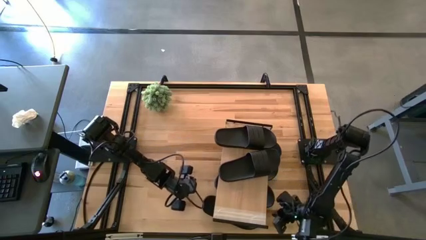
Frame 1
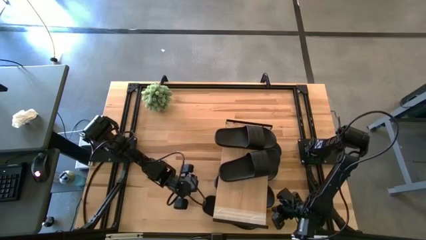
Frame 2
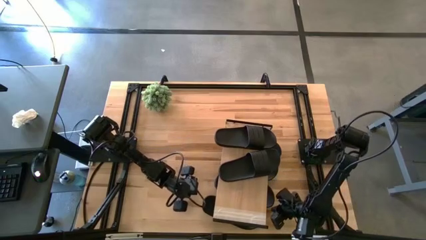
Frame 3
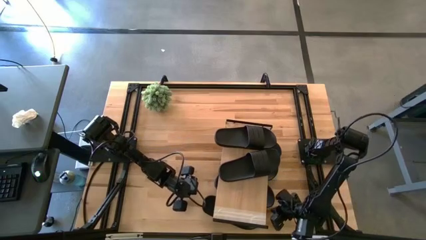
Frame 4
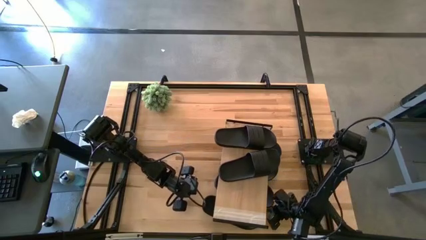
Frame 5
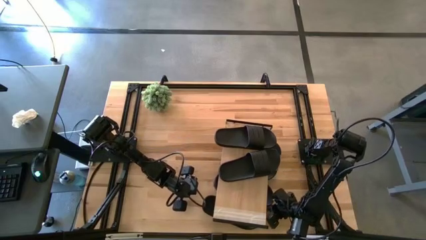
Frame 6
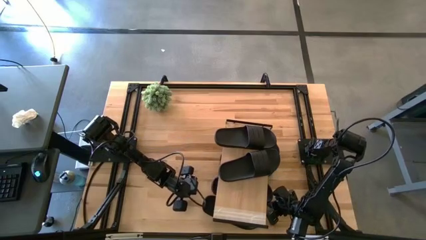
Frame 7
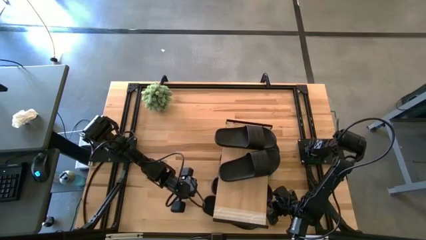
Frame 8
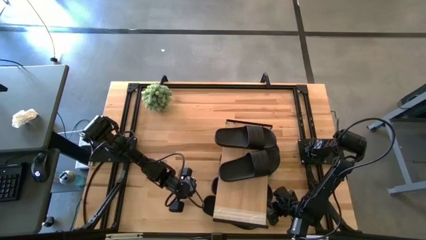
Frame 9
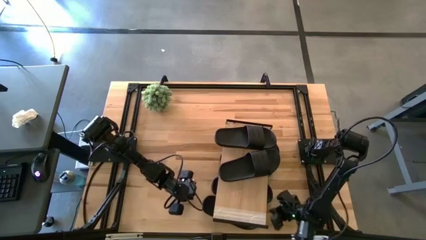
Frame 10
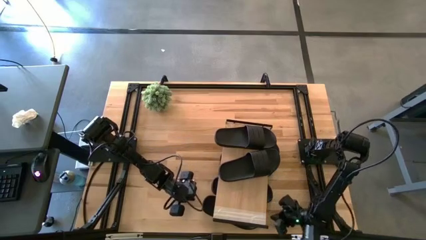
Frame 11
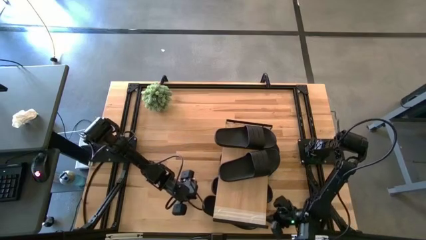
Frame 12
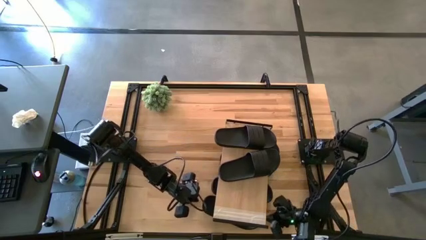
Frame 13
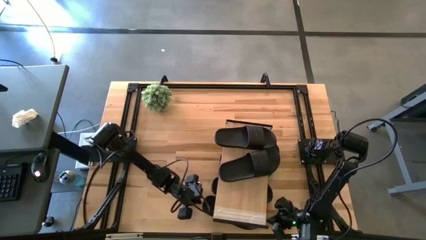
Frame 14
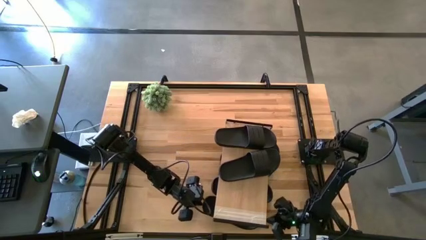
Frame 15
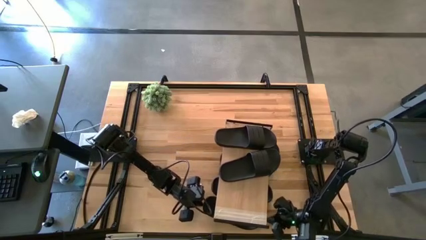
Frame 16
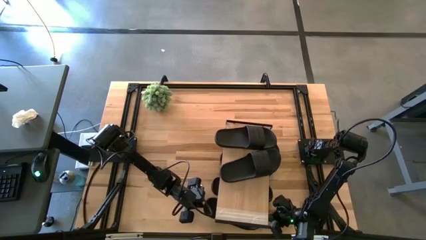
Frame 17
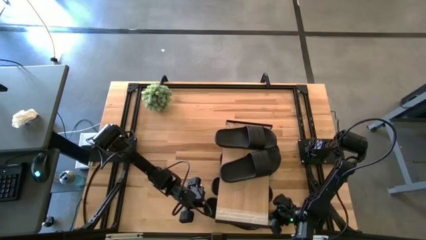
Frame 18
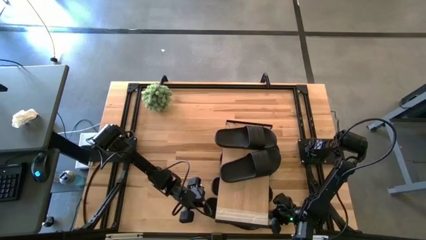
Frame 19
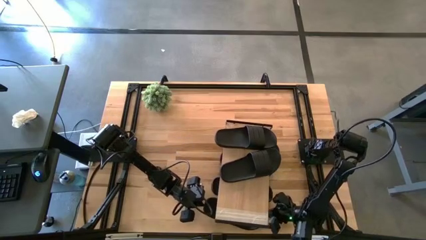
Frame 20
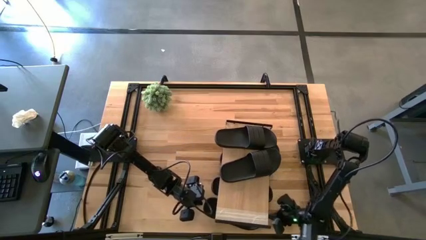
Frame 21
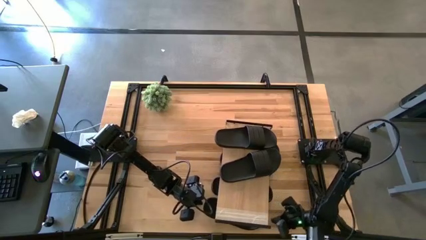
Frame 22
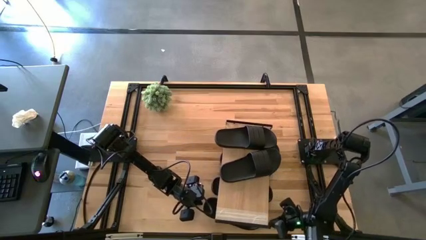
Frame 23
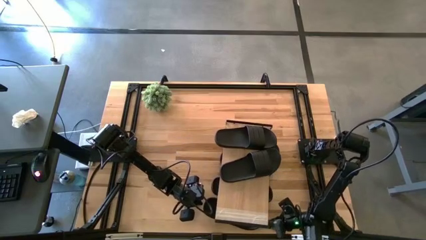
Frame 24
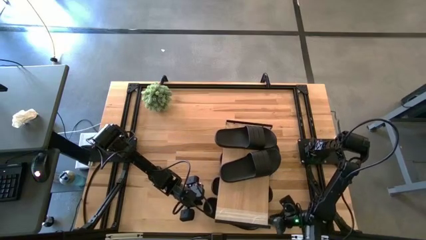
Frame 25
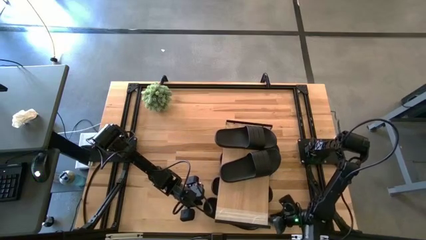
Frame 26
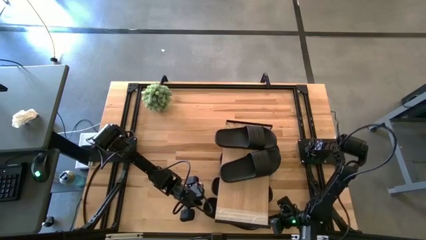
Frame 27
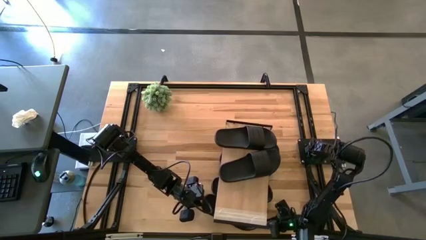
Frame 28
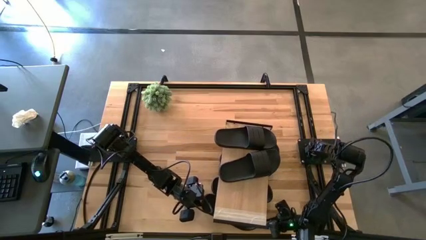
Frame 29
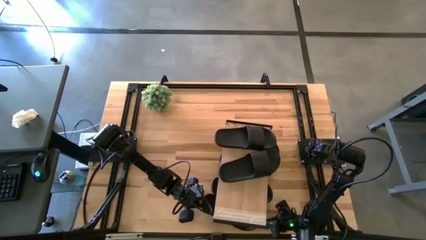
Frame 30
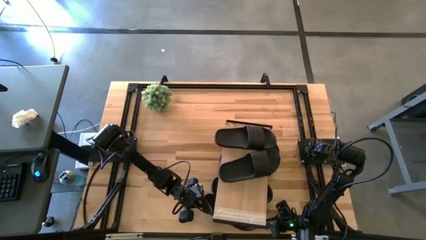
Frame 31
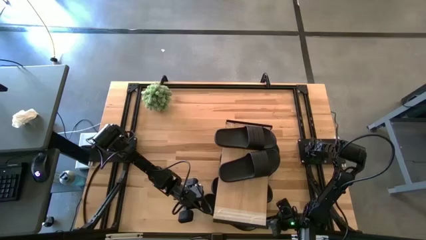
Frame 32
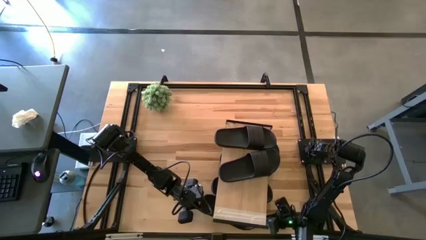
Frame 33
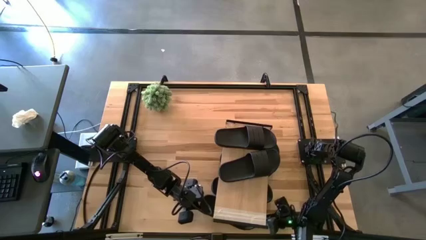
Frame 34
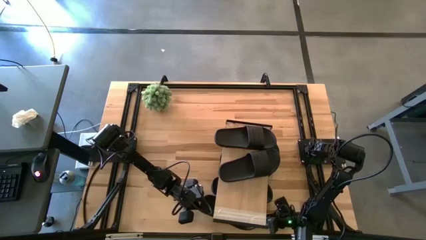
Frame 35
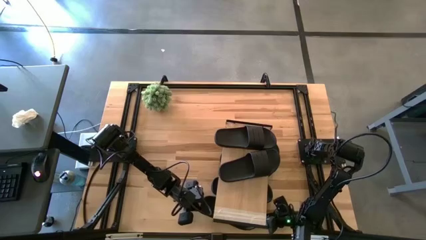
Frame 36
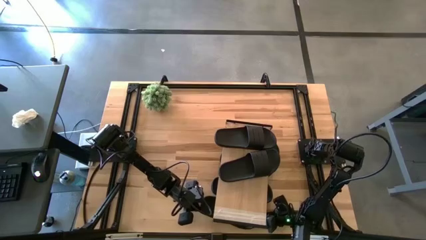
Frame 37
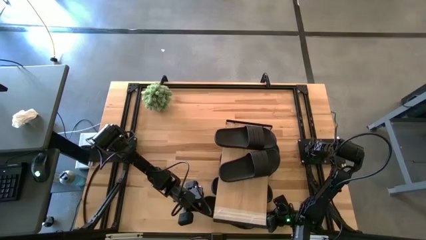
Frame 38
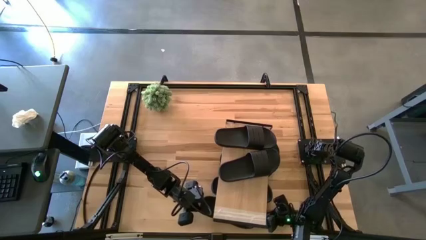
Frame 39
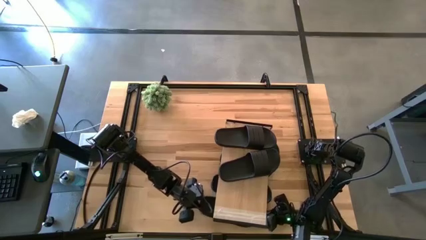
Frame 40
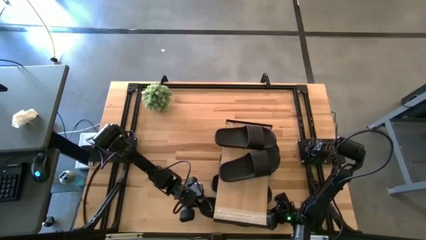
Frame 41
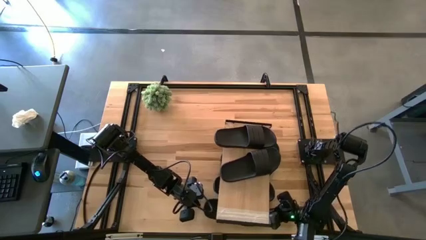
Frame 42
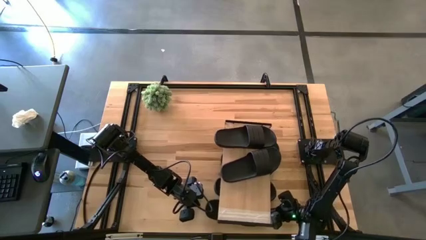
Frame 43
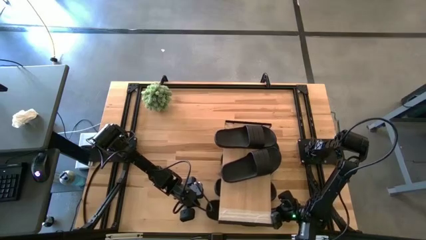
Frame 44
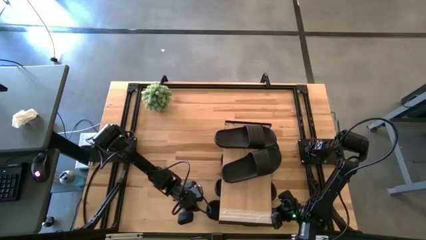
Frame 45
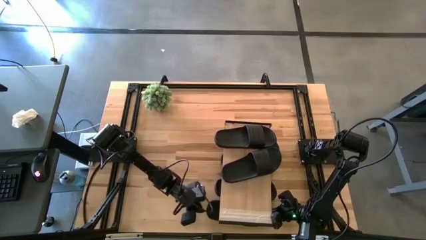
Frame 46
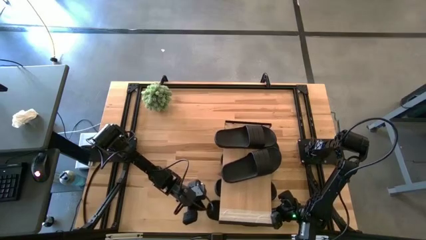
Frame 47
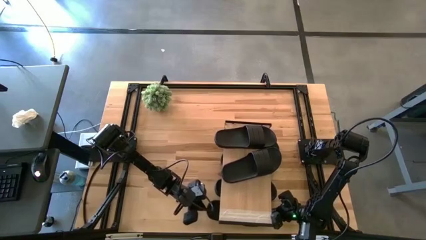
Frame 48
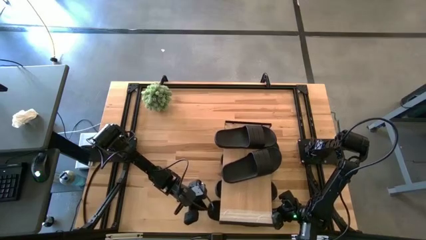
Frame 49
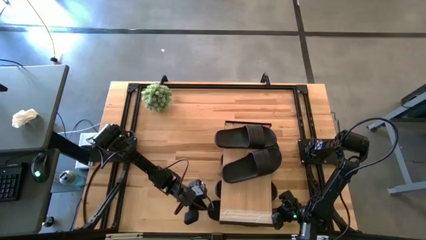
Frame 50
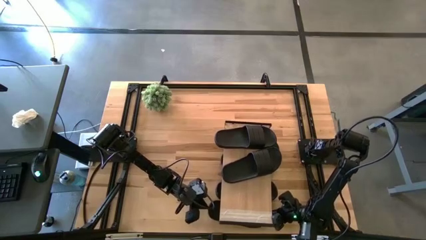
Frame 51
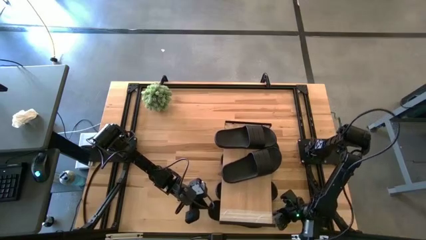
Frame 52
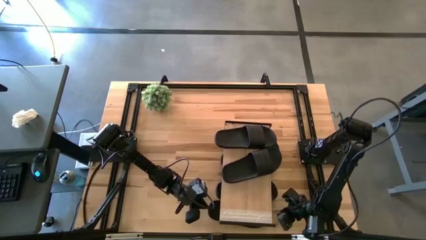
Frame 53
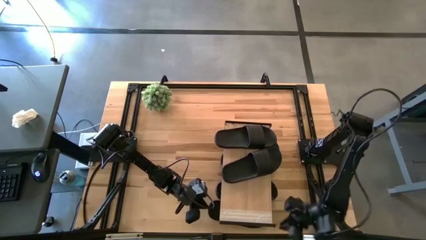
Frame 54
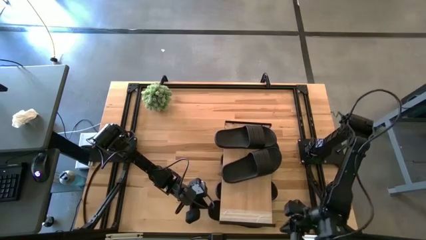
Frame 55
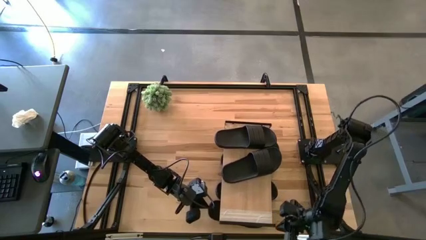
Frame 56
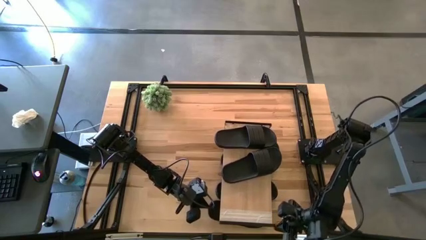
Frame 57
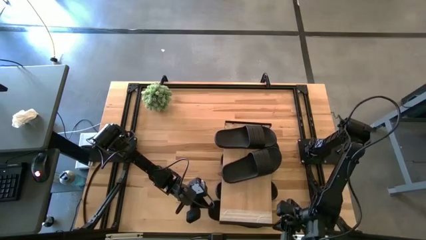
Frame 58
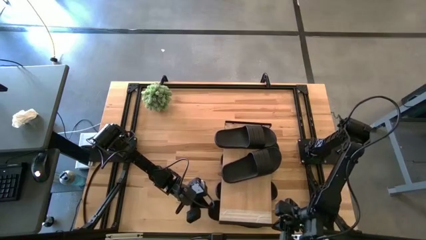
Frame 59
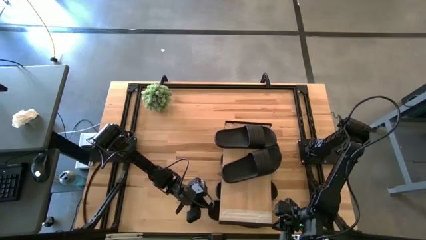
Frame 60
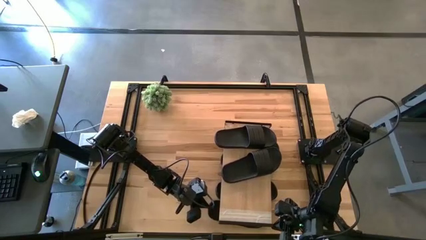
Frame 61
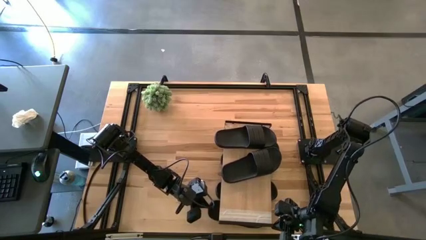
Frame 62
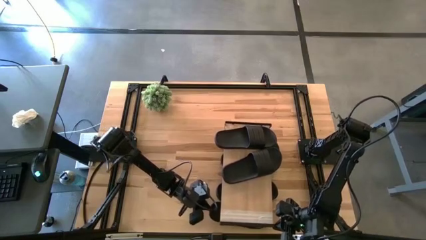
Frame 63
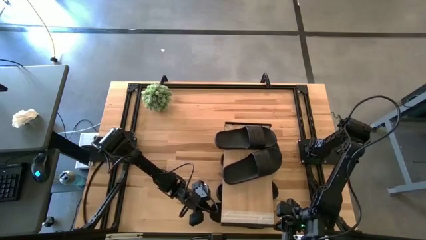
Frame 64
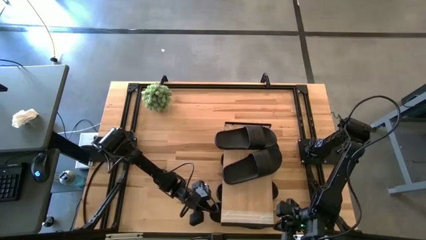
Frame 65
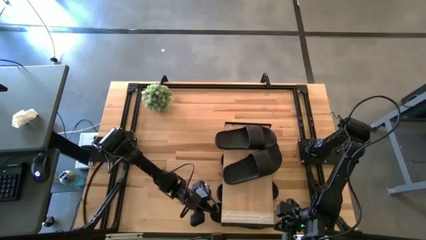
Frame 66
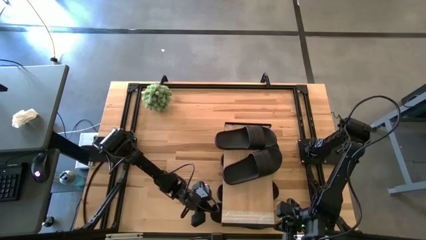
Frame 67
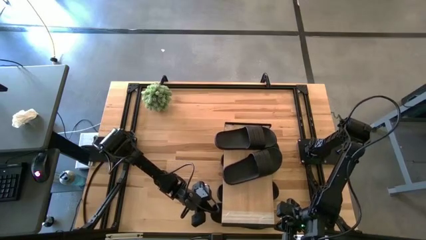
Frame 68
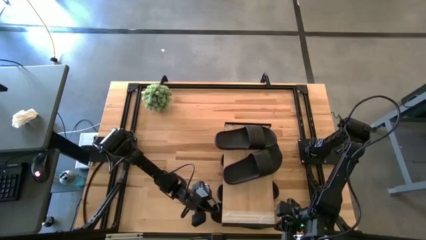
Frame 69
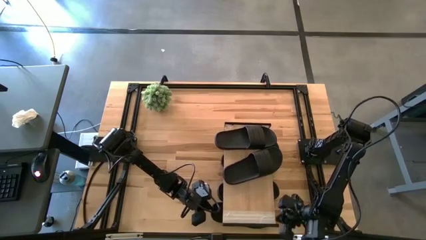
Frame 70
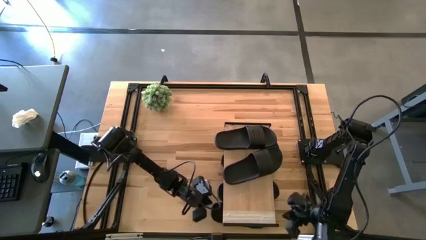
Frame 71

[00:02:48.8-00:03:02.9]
Task: Pick and place slides into the shelf
Adjust the black slides under the shelf

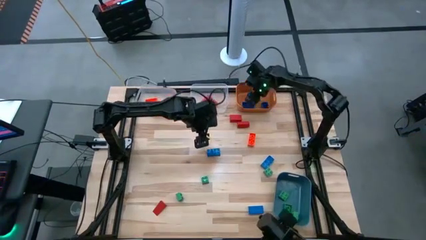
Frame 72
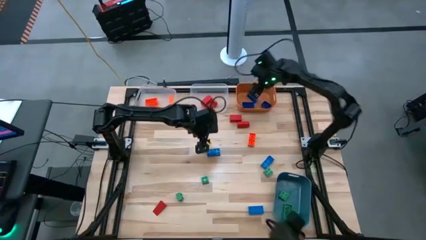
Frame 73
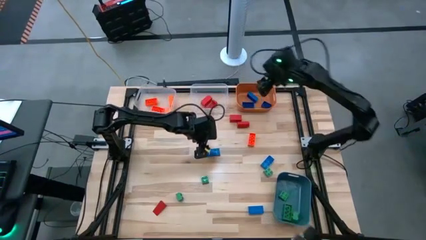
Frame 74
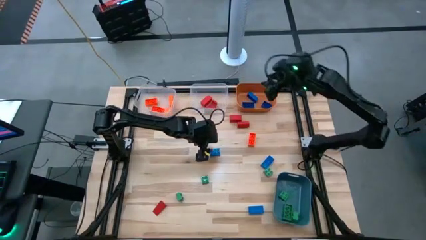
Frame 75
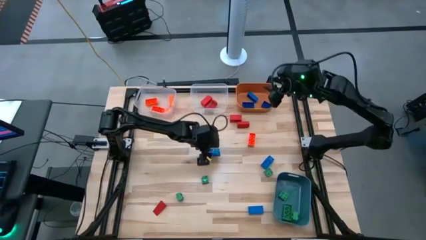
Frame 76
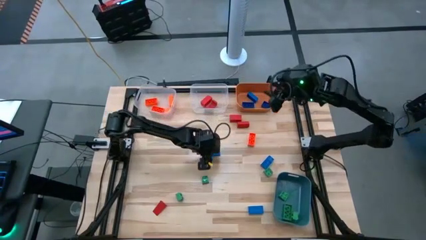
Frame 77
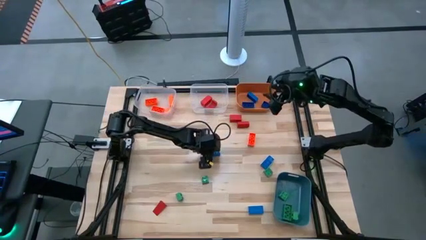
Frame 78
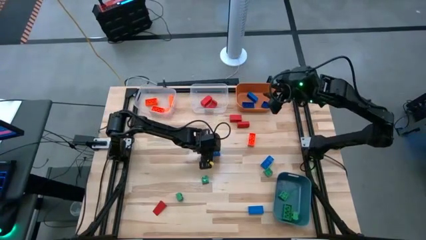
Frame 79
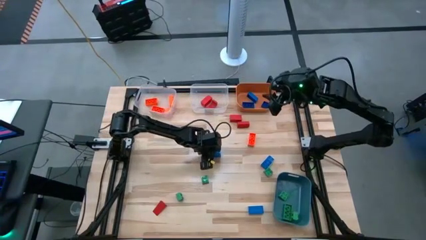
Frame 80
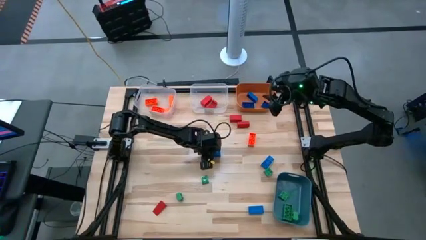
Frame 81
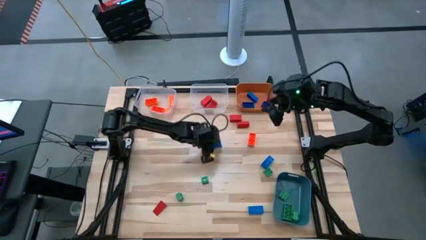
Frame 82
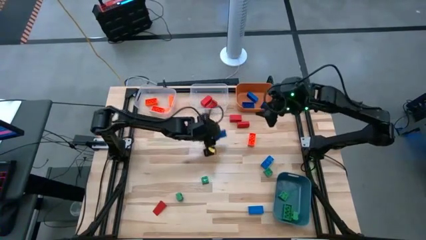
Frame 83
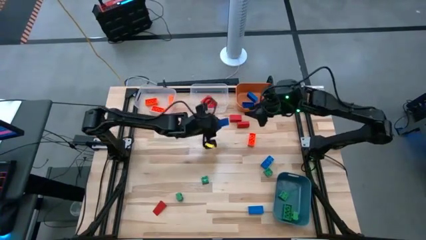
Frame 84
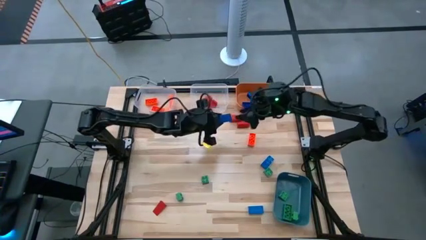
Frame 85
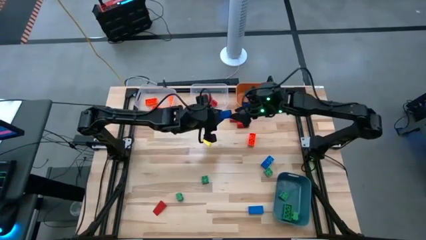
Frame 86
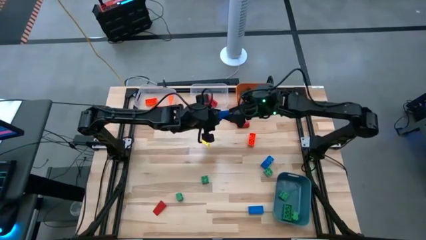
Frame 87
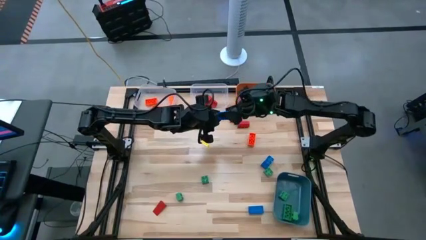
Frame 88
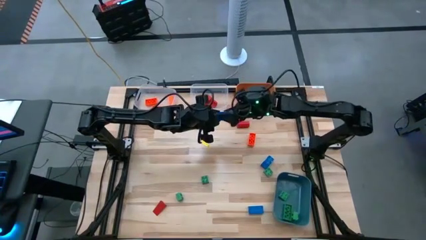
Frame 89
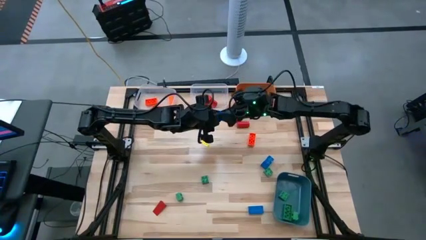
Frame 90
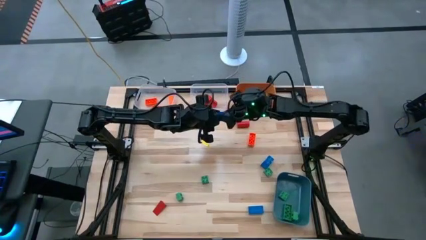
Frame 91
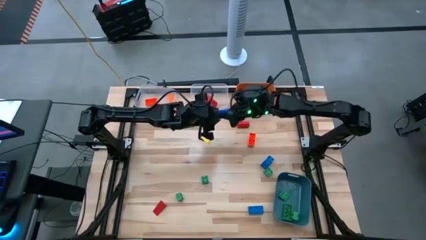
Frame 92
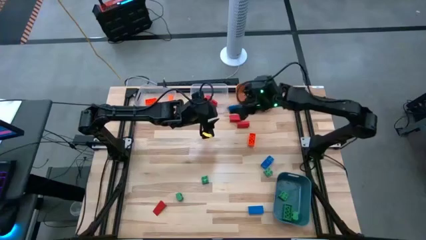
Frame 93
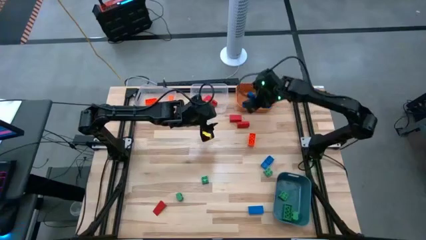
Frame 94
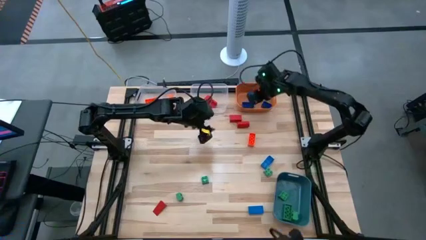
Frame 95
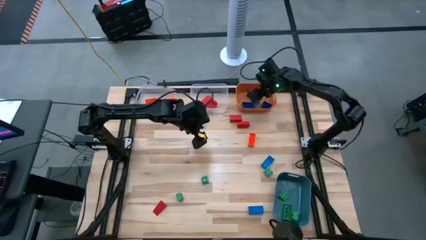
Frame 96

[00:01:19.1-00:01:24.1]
Task: Sort blocks
Put the blue game piece into the orange bin
